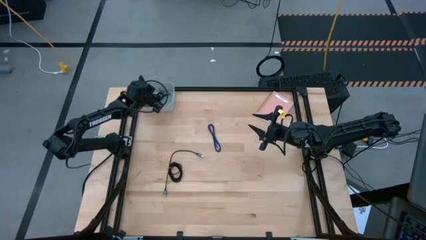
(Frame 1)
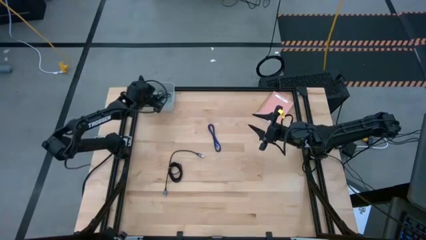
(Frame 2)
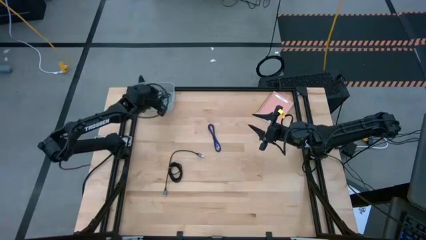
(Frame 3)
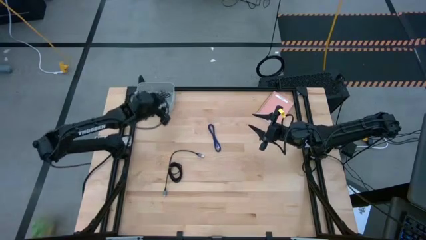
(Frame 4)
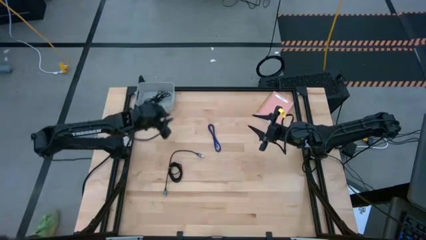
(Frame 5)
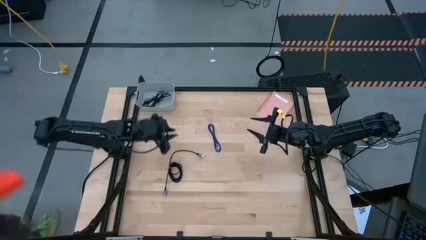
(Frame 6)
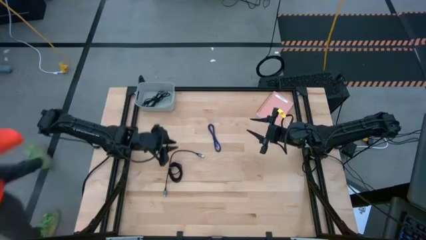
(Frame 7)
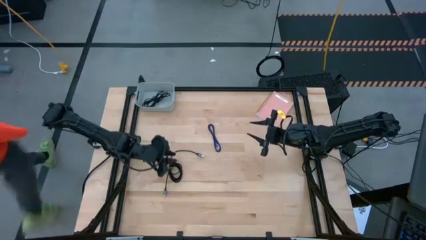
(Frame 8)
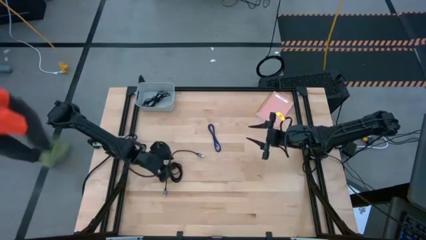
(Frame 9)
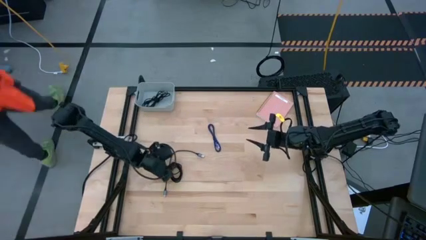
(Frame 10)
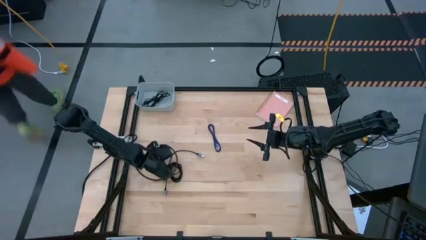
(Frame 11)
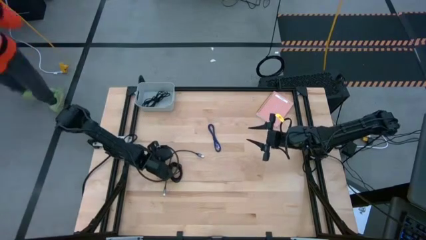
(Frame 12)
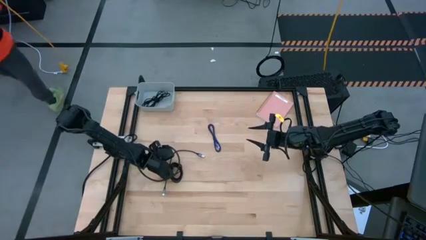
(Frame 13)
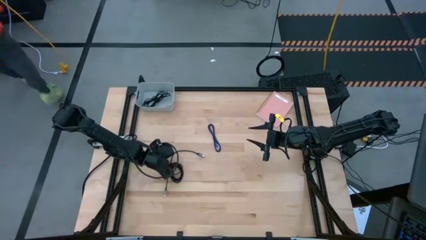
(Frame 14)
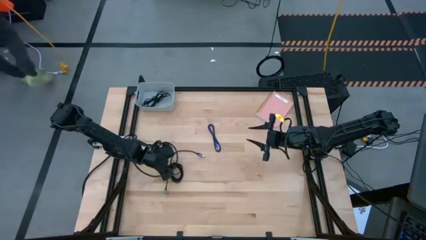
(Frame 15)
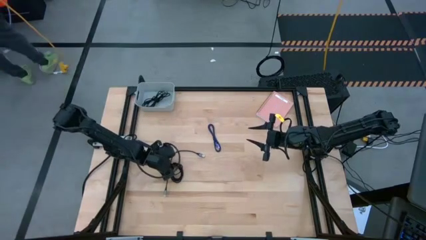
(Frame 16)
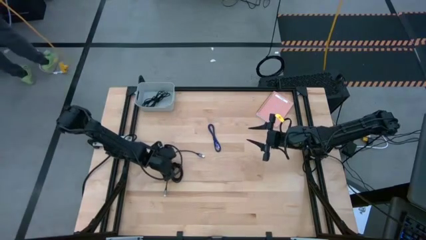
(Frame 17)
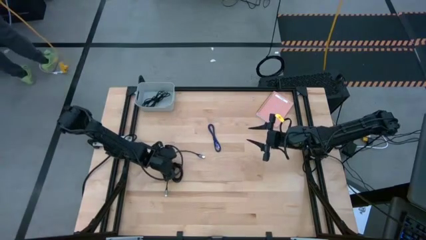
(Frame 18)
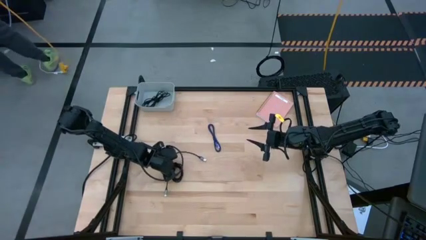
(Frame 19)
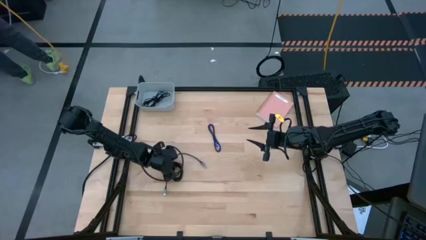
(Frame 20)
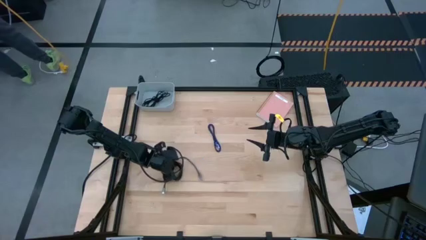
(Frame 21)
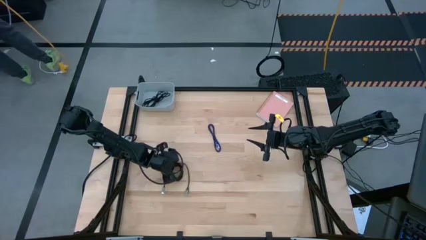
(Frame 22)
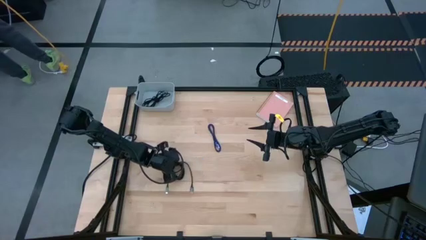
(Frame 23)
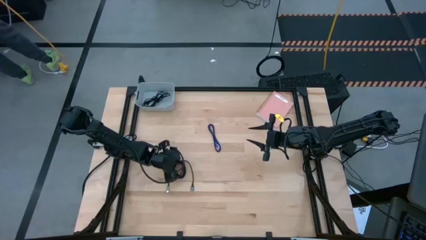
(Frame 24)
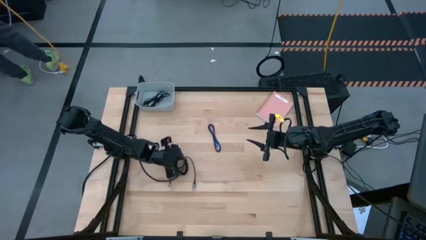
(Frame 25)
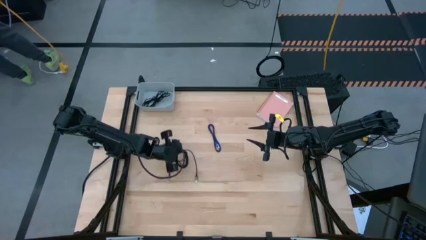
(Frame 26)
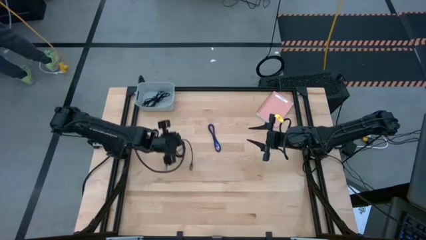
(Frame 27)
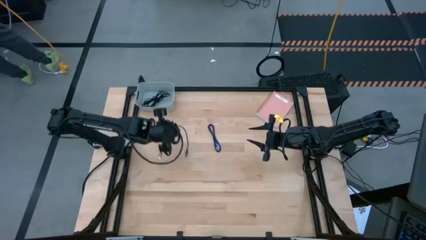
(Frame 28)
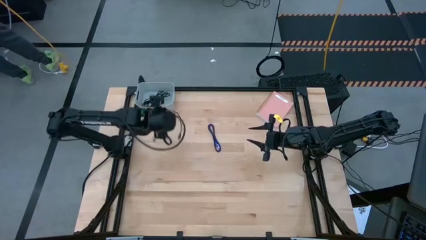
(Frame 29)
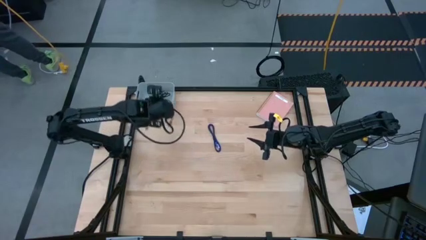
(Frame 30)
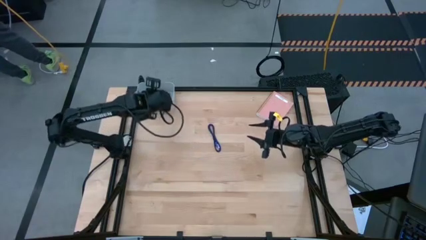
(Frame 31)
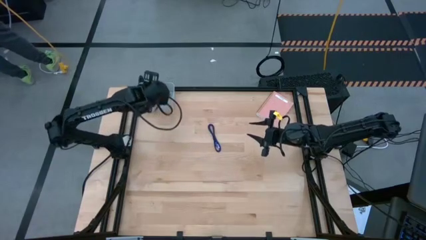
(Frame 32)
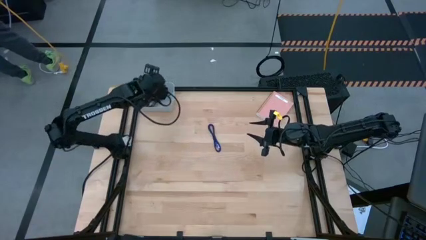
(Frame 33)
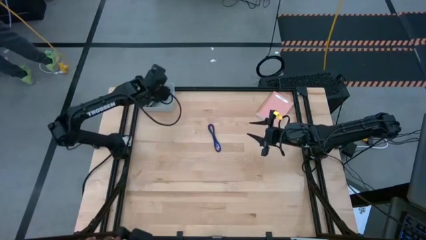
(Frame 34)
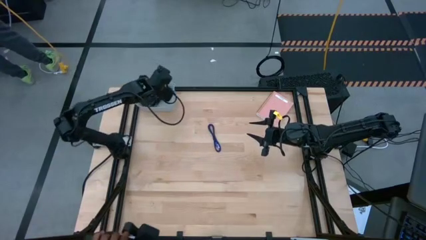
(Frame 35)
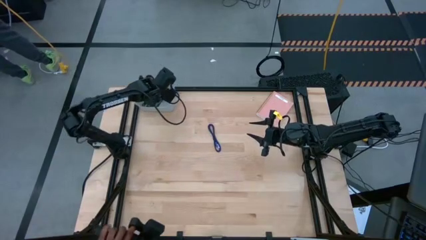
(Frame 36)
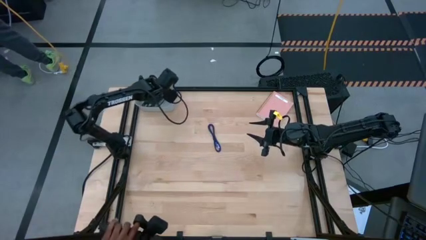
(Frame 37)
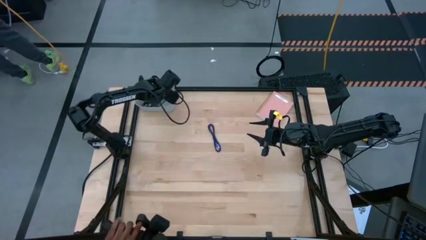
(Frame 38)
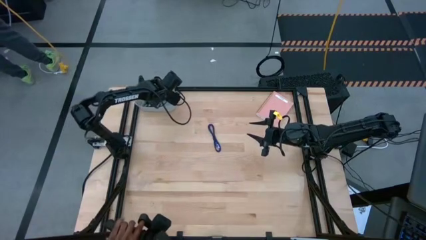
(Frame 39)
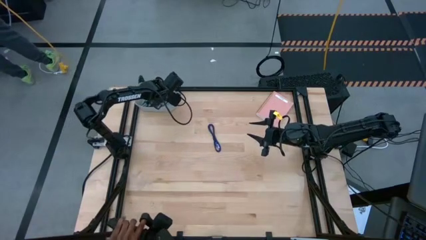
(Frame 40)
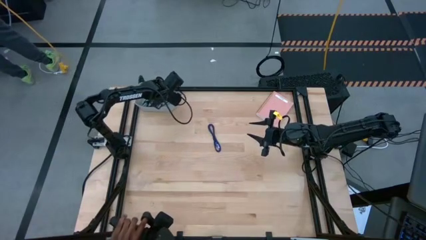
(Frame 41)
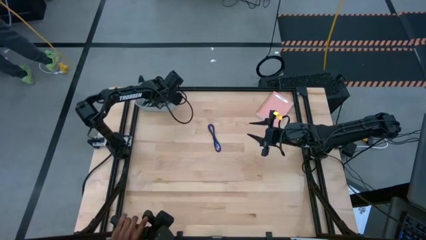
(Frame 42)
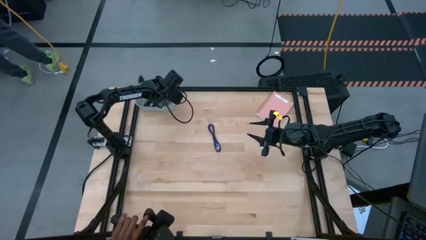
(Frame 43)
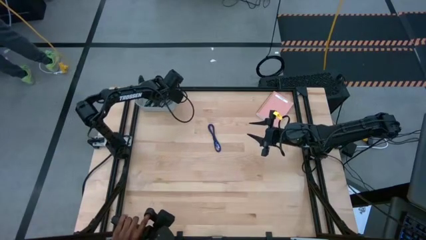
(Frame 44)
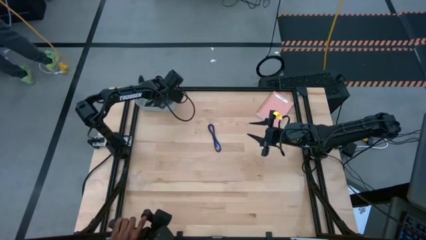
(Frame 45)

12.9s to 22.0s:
Task: Pick and place USB-C Cables
Put the black charger cable into the white bin

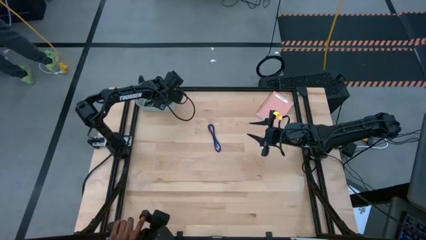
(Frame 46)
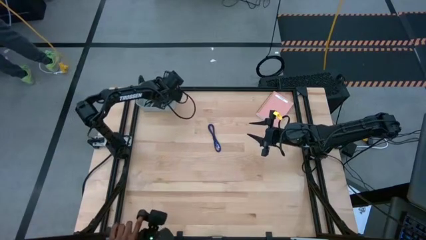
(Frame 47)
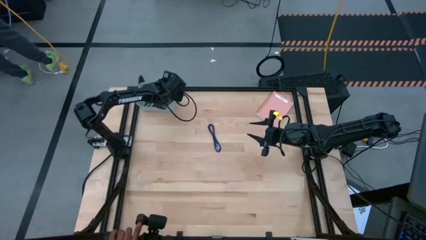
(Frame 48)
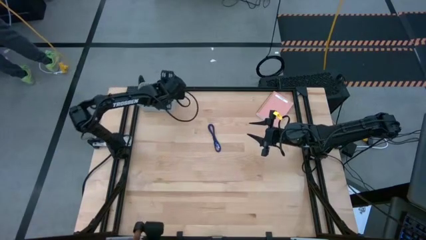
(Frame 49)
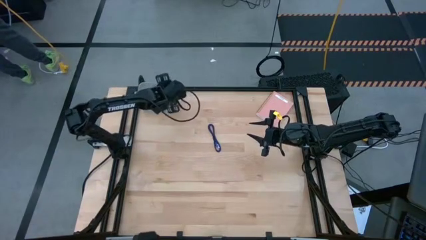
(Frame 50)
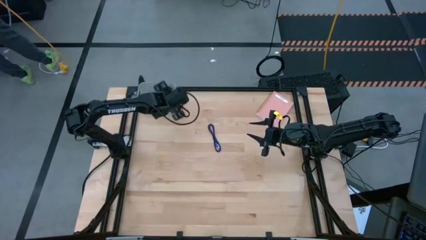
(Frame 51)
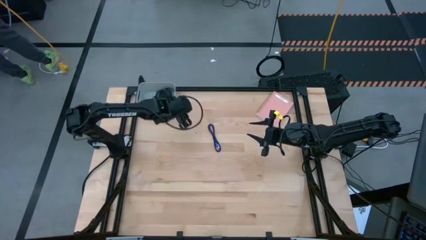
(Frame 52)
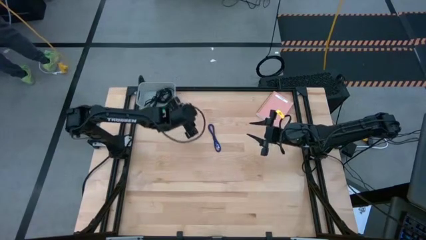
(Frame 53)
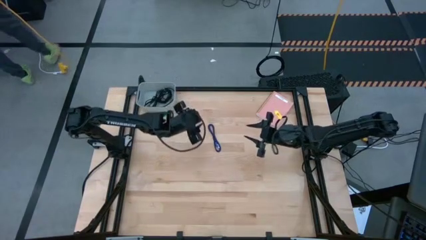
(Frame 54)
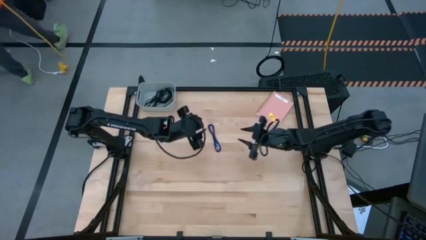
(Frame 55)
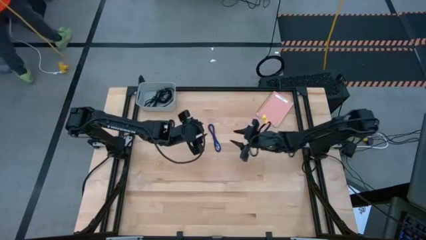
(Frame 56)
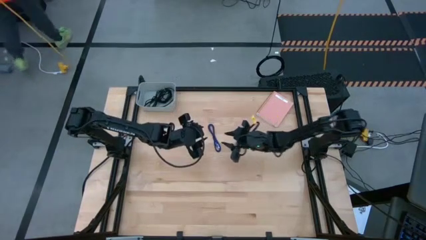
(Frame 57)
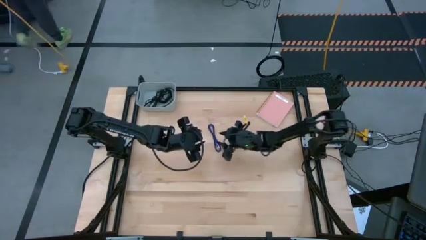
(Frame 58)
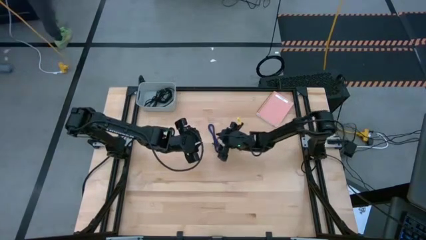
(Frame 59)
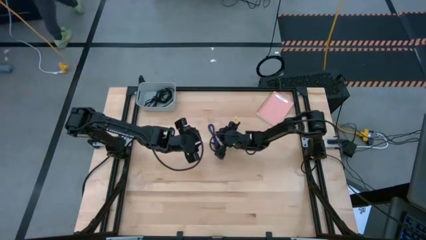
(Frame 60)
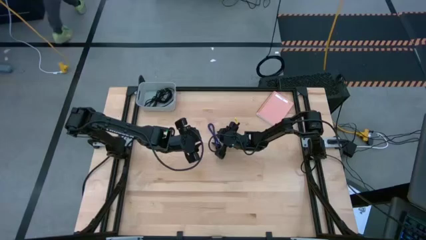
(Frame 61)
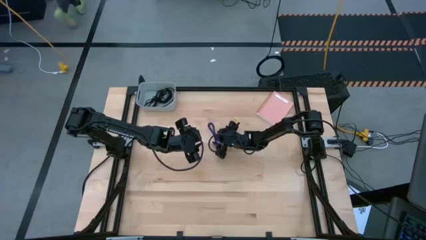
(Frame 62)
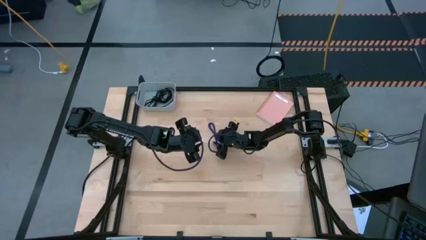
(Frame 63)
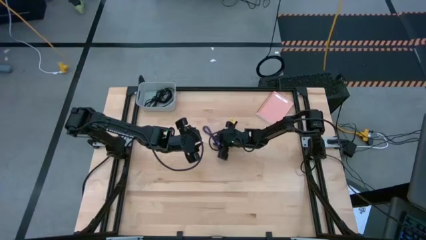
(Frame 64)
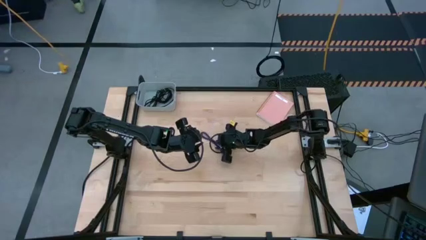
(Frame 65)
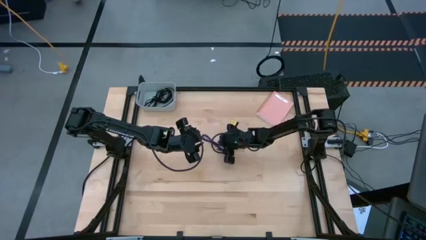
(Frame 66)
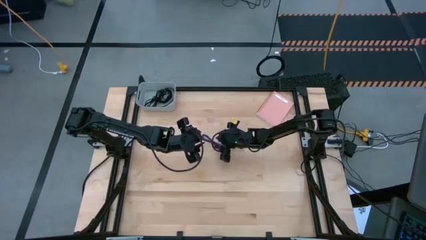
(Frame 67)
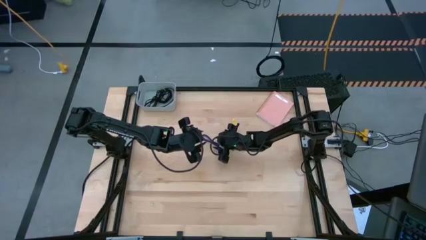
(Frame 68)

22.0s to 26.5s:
Put the blue charger cable into the white bin
